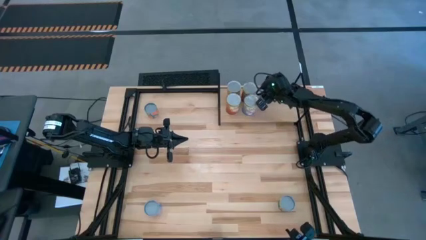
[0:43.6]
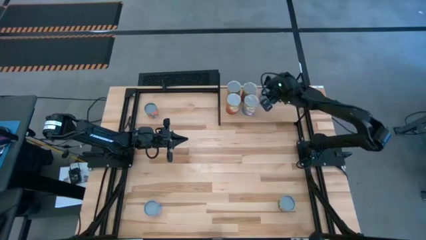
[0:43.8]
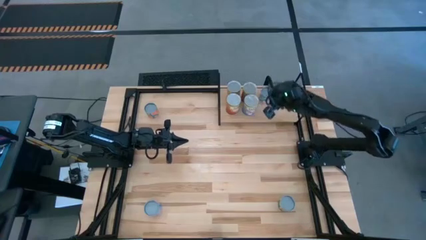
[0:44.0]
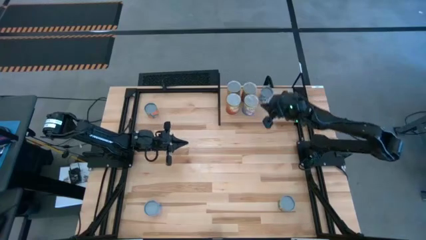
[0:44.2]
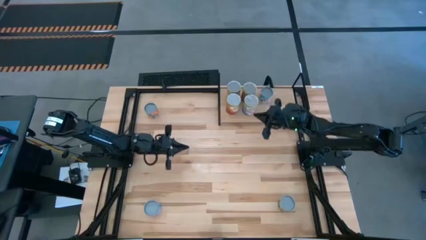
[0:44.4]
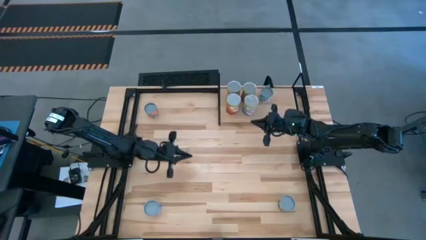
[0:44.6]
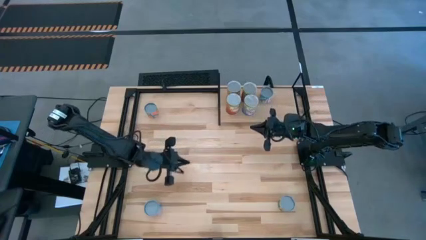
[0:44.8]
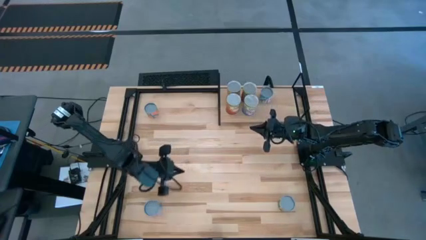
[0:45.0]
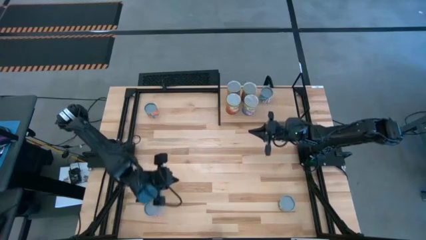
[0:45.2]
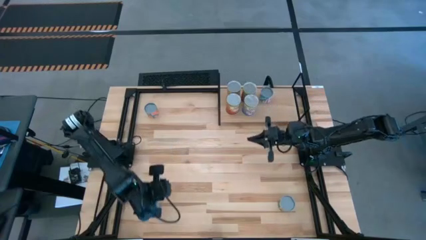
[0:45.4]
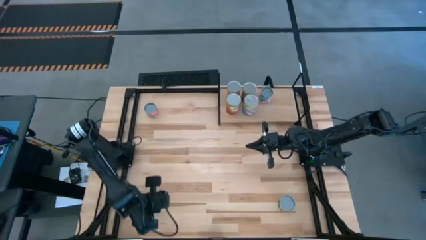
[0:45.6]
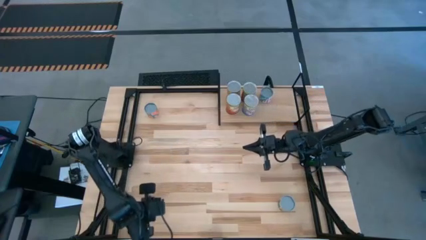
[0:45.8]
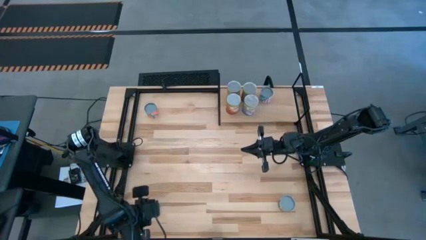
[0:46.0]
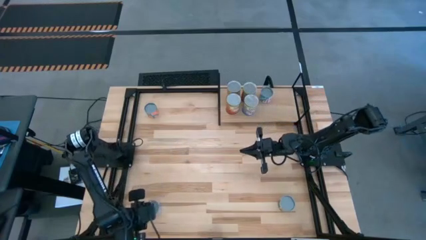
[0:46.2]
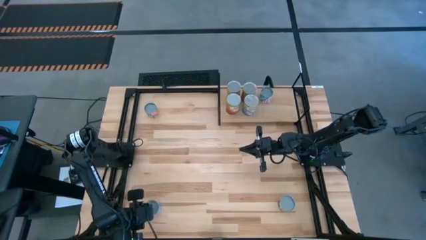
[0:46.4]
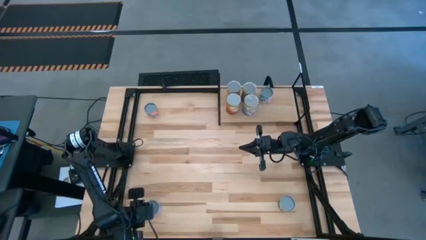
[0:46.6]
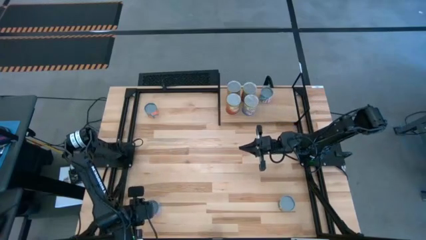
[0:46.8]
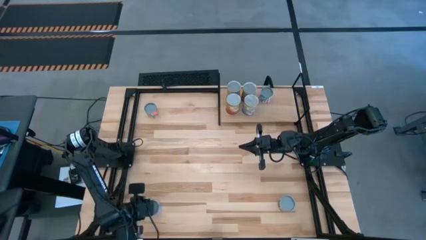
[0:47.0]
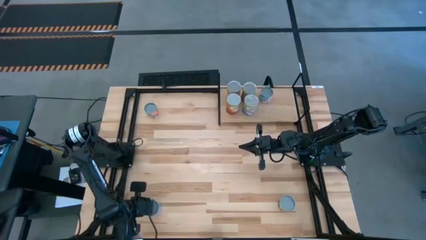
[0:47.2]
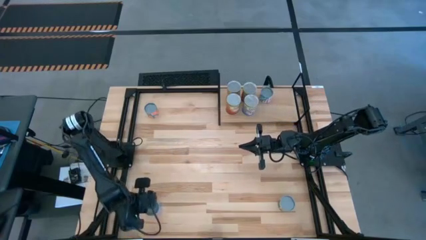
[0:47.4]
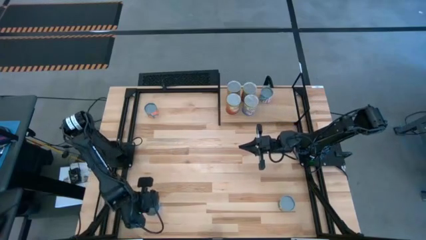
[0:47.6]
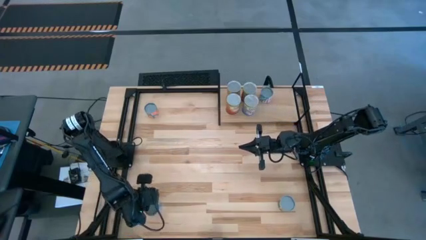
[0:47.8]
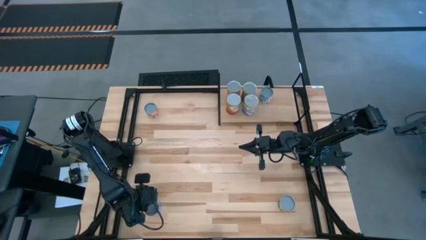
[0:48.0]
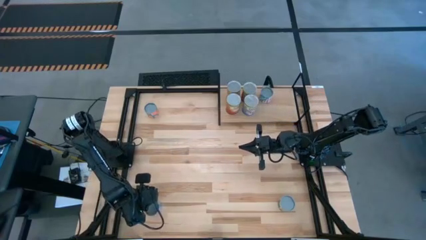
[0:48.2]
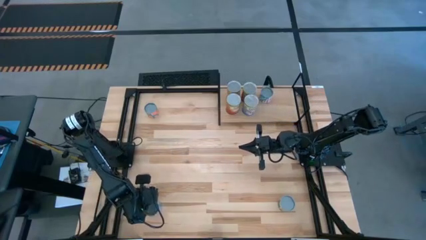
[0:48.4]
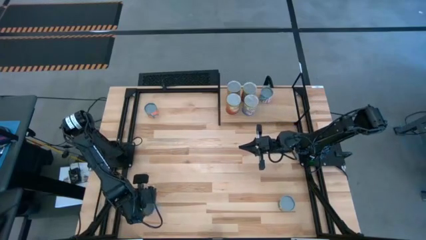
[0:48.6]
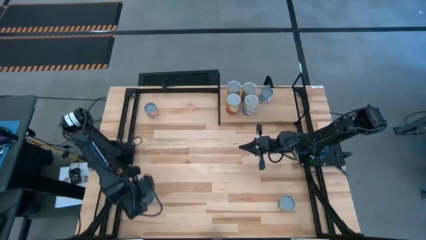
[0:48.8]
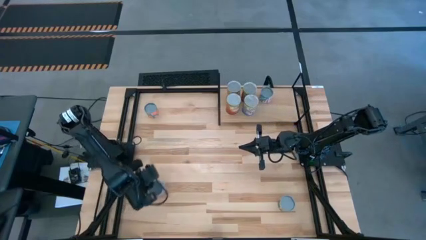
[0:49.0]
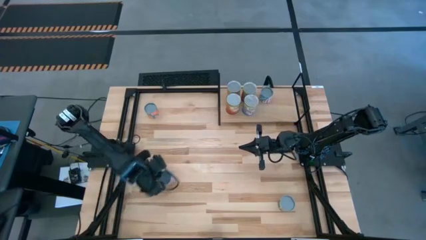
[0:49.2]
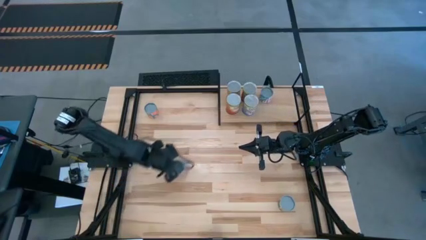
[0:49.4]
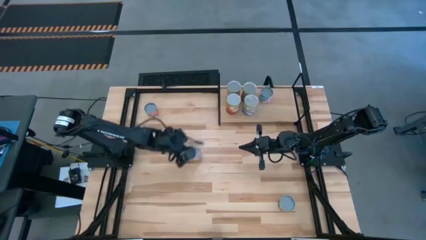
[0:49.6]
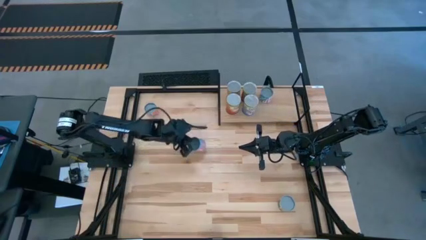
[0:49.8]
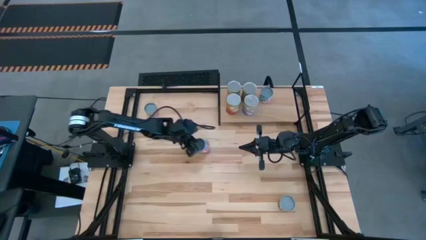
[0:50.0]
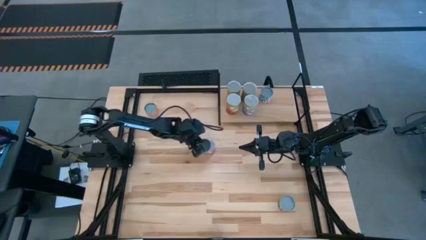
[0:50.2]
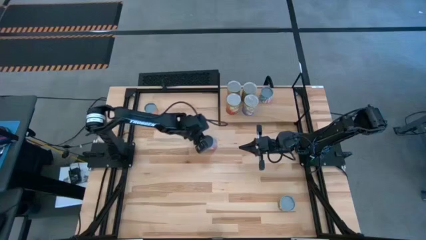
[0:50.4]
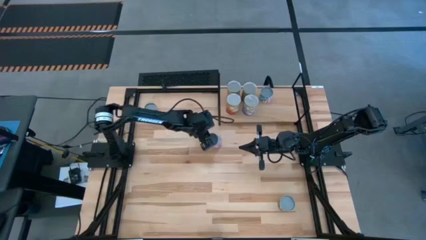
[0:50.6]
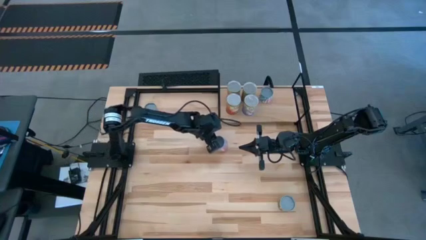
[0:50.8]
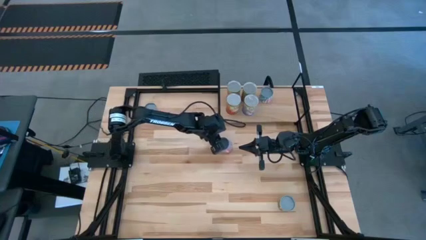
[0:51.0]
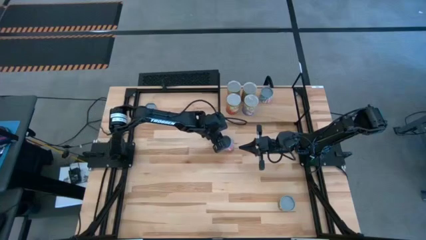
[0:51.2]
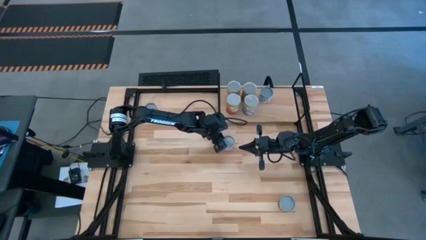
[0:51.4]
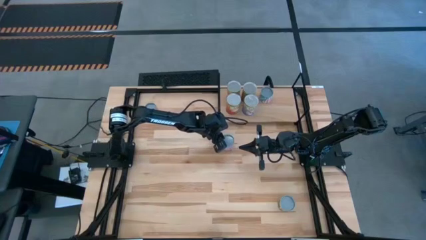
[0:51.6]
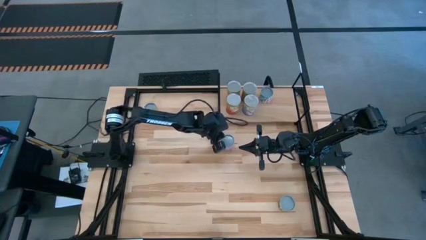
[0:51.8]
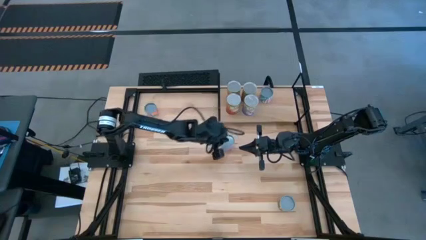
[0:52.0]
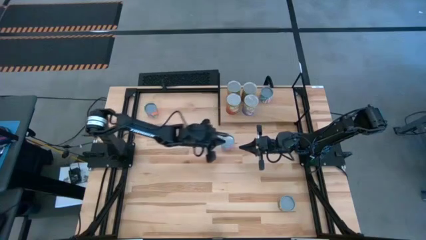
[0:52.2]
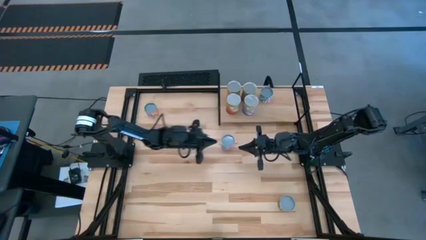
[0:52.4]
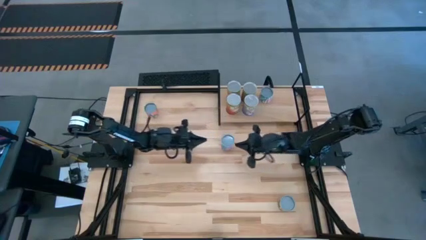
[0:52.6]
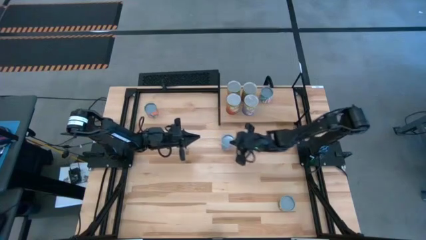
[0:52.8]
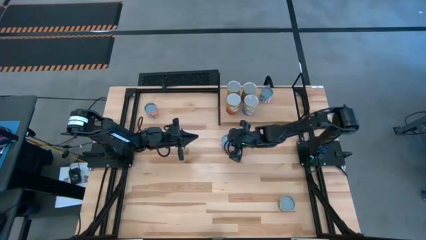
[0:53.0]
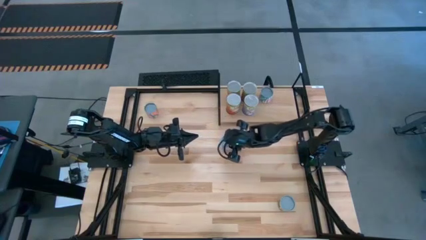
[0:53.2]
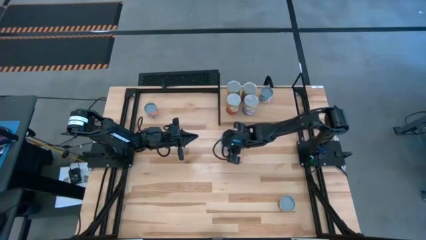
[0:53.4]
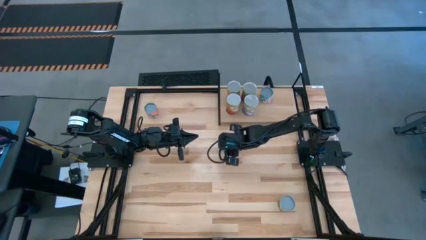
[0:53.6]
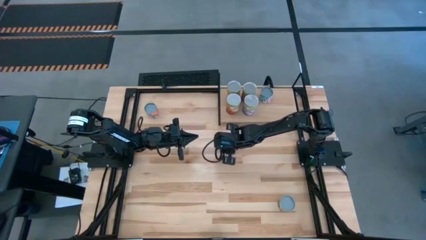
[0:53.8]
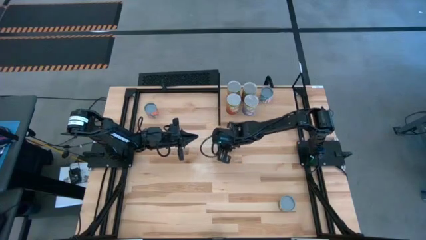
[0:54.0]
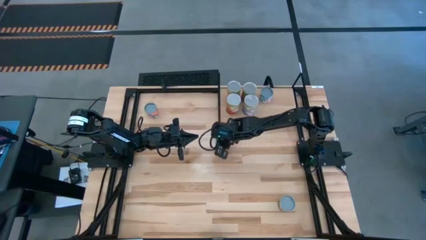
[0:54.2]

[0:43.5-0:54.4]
Task: Pick and place cans onto a shelf
Put the small canned corn on the shelf

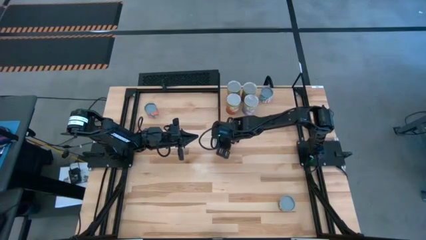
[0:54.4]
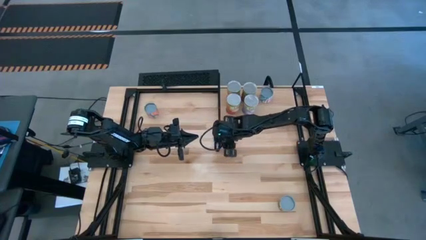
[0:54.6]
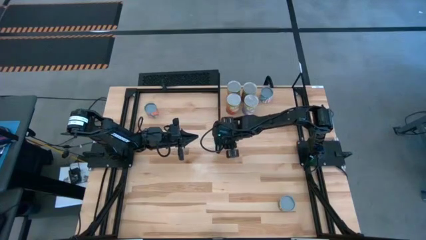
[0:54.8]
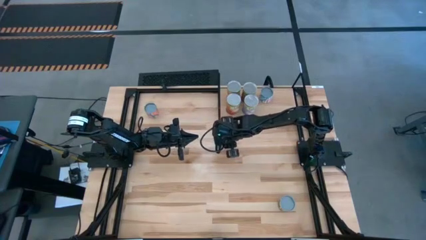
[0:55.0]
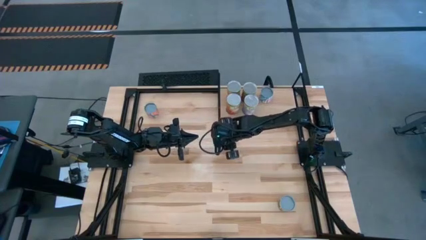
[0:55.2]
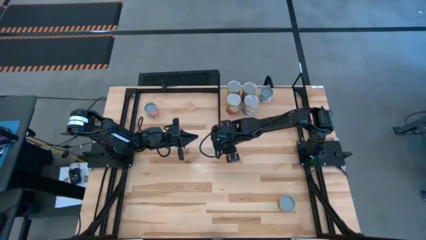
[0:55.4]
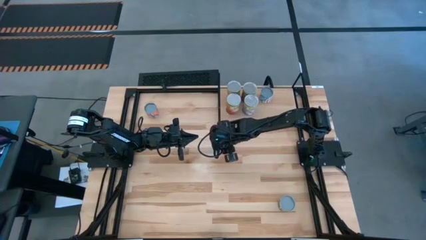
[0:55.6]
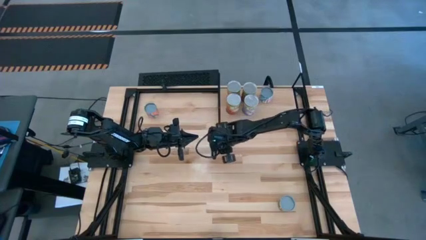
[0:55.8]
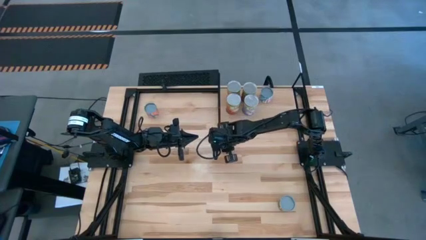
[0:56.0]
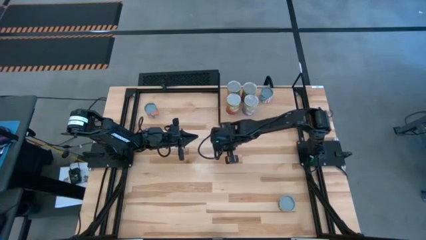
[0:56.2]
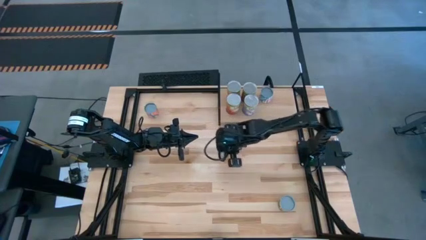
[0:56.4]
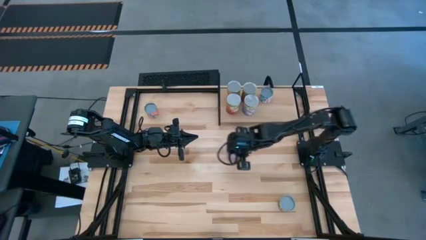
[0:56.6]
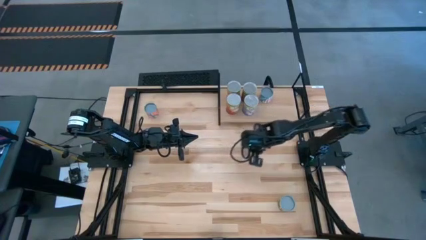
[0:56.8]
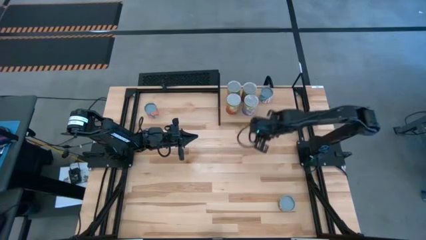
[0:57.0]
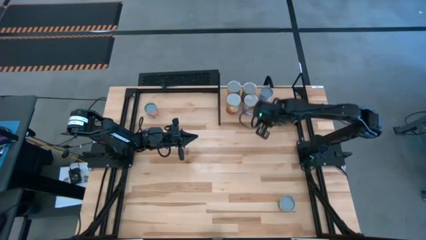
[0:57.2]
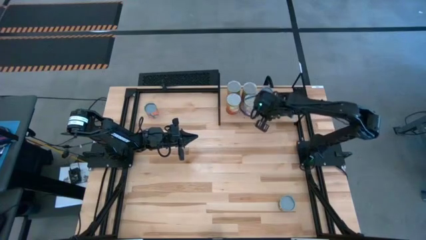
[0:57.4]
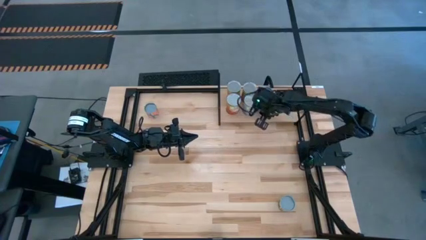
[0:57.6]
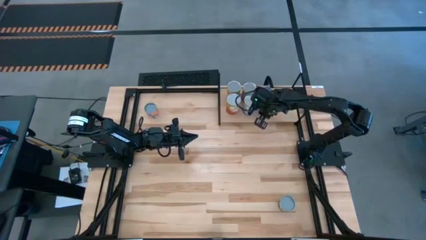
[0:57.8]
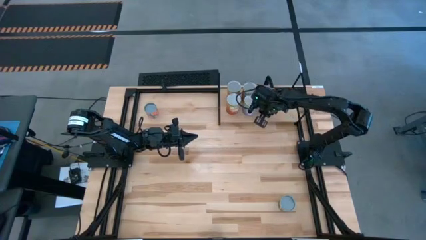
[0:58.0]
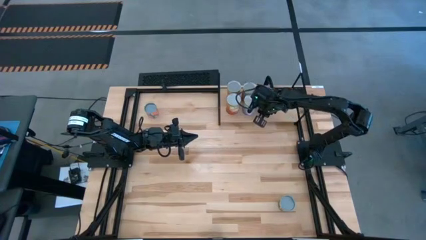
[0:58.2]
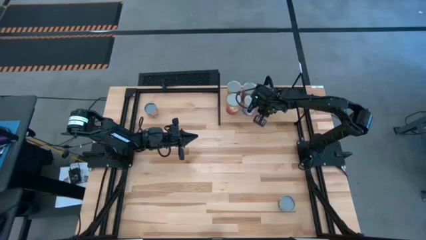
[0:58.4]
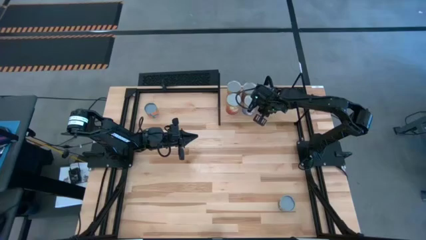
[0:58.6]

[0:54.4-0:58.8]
Put the small canned corn on the shelf

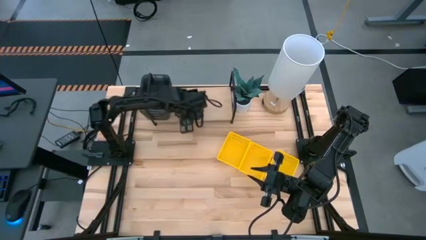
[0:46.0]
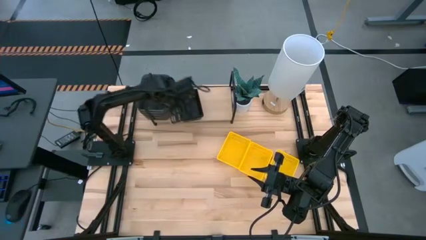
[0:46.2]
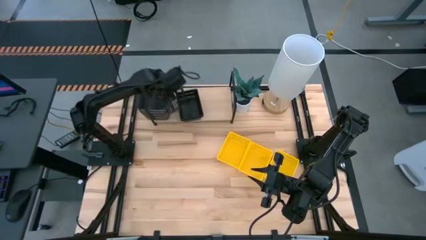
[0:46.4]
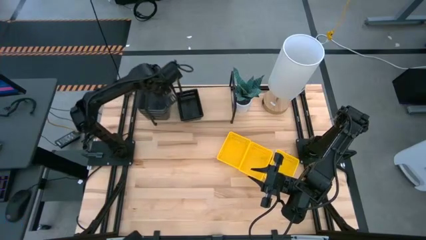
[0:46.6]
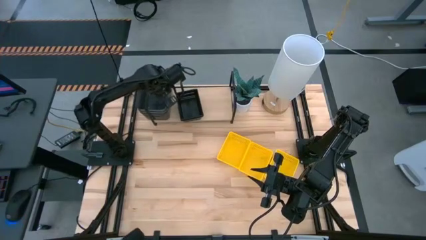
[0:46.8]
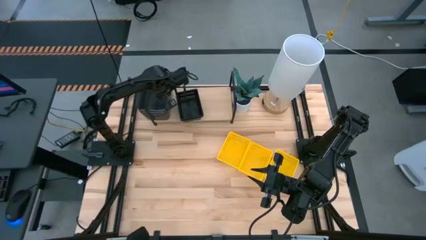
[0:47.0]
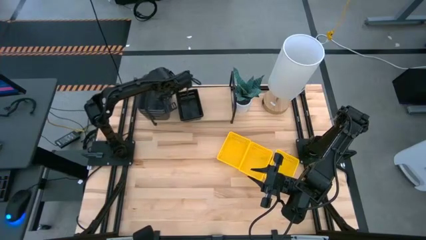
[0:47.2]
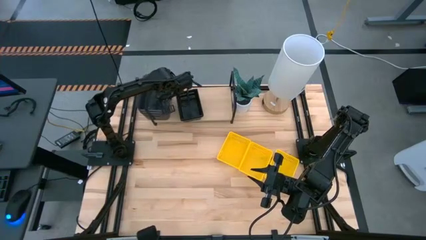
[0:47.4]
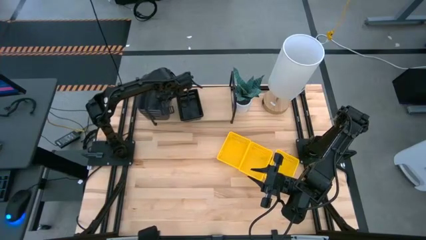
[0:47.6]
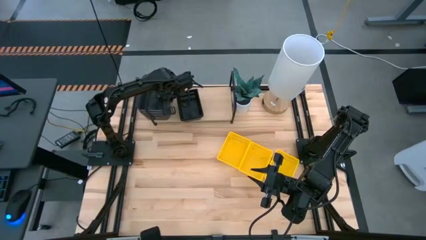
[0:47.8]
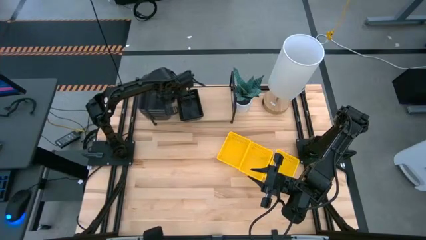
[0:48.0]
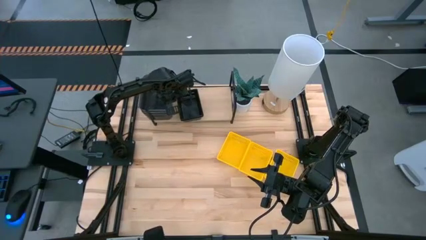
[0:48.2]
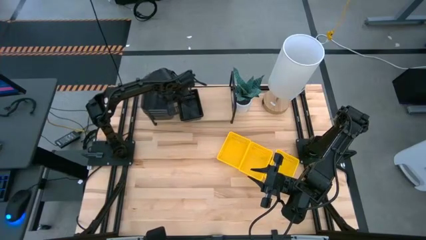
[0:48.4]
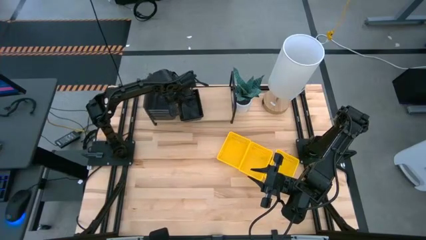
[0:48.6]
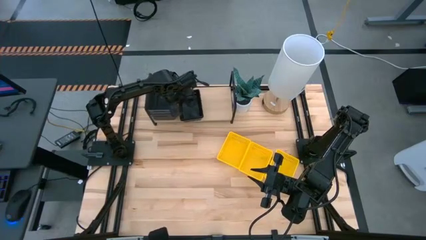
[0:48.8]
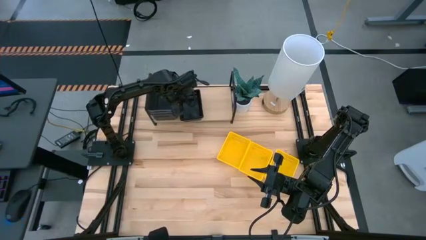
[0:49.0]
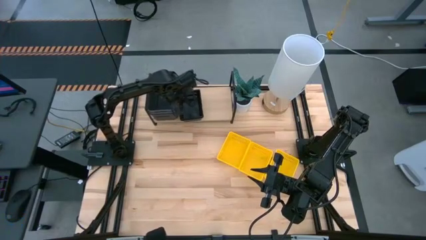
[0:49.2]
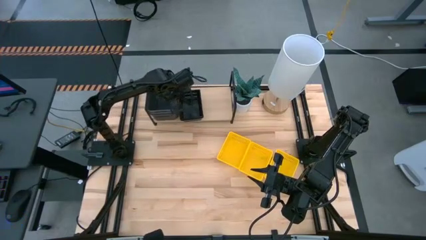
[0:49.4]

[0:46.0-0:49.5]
Task: Stack baskets on shelf by color
Adjust the stacked gray bins on the shelf
